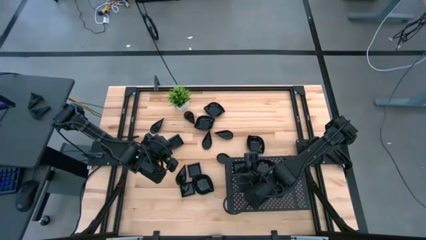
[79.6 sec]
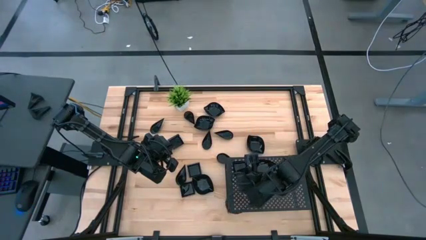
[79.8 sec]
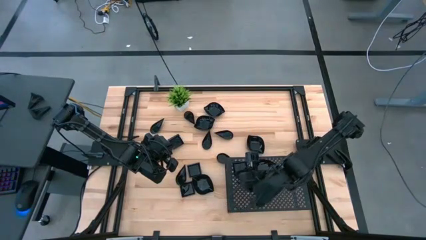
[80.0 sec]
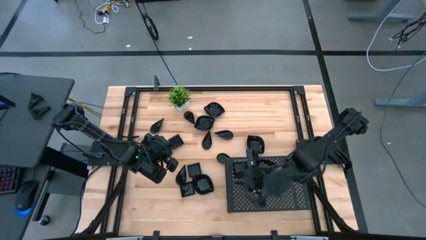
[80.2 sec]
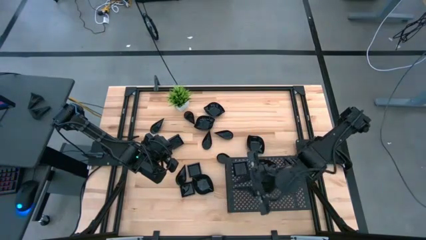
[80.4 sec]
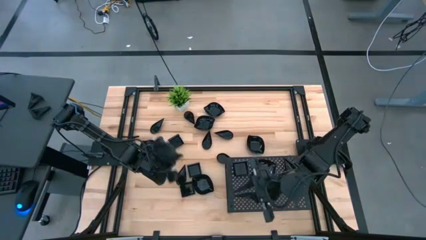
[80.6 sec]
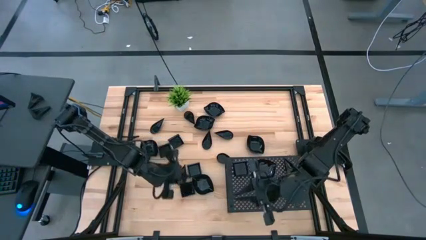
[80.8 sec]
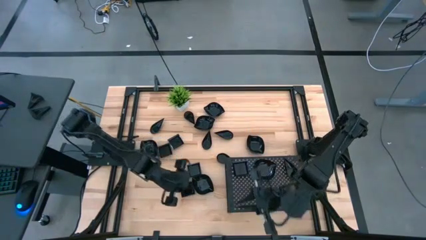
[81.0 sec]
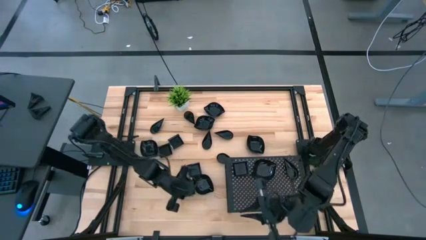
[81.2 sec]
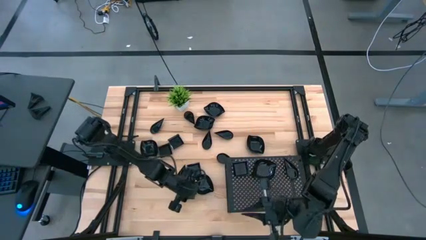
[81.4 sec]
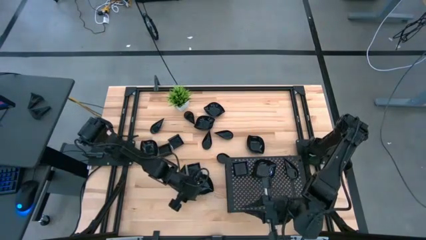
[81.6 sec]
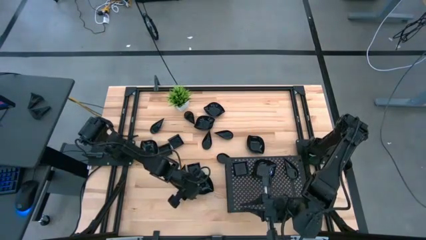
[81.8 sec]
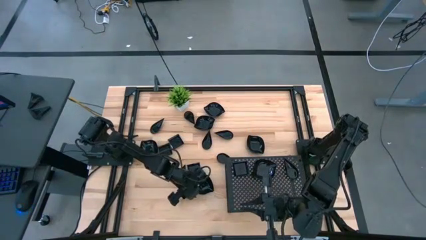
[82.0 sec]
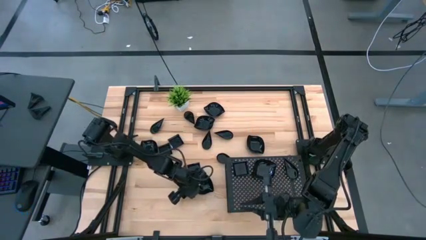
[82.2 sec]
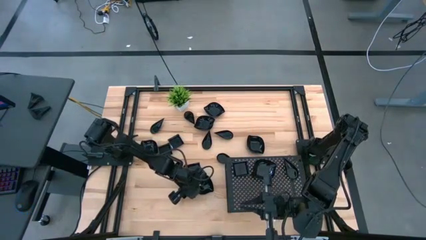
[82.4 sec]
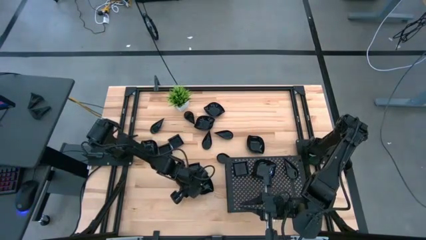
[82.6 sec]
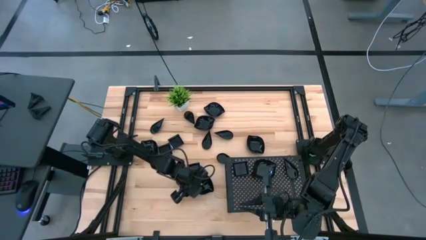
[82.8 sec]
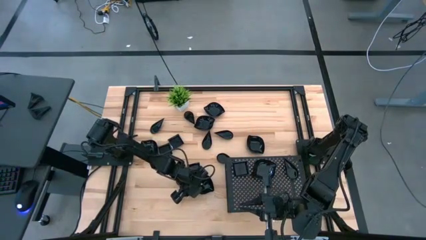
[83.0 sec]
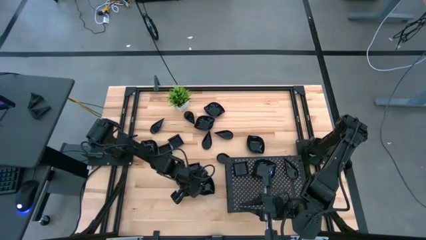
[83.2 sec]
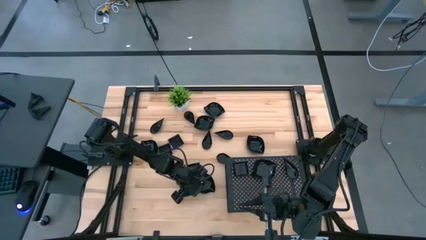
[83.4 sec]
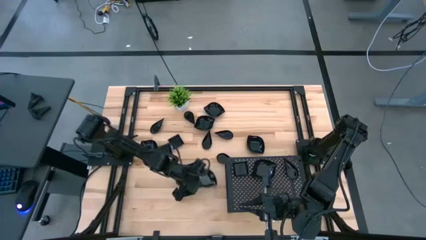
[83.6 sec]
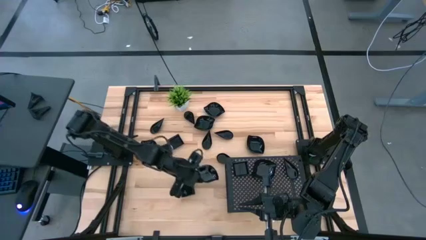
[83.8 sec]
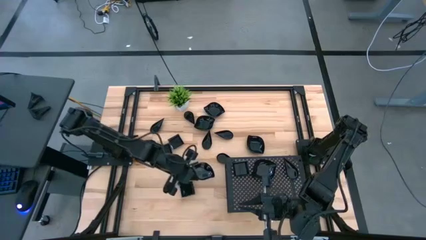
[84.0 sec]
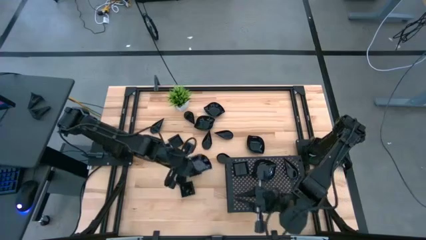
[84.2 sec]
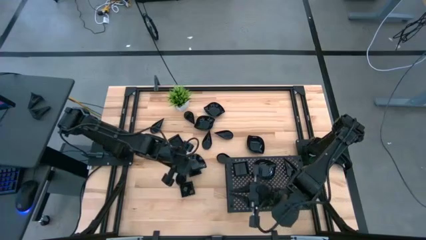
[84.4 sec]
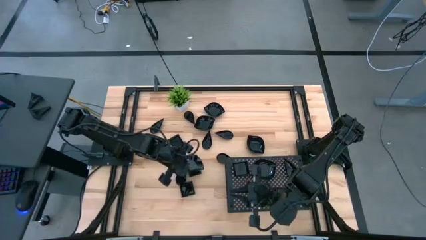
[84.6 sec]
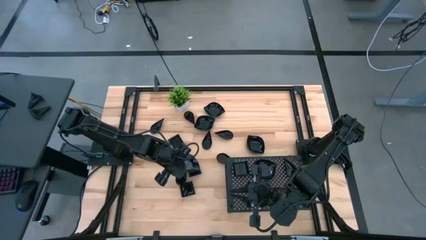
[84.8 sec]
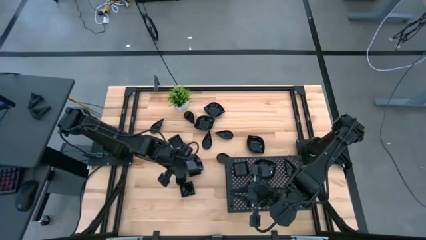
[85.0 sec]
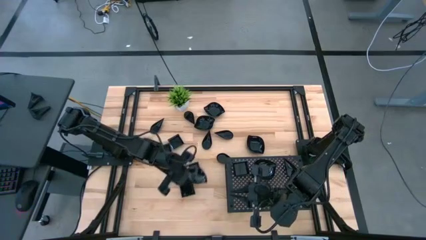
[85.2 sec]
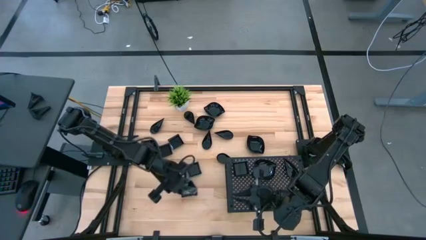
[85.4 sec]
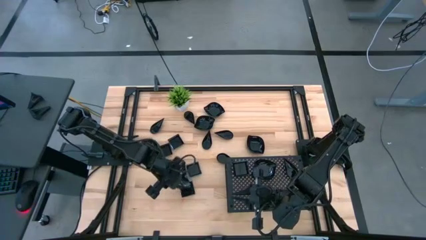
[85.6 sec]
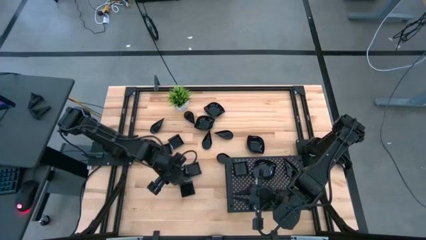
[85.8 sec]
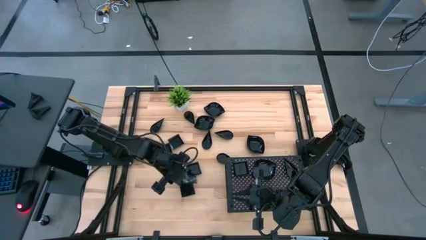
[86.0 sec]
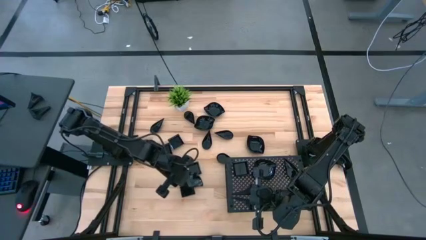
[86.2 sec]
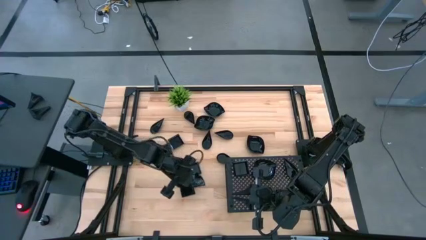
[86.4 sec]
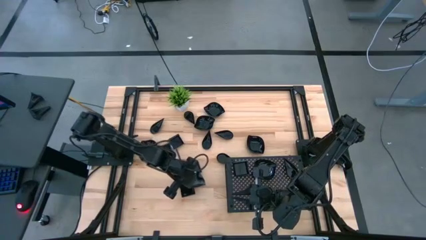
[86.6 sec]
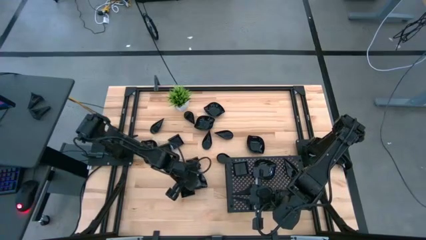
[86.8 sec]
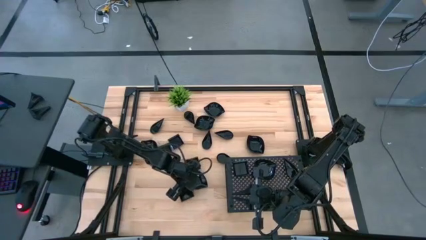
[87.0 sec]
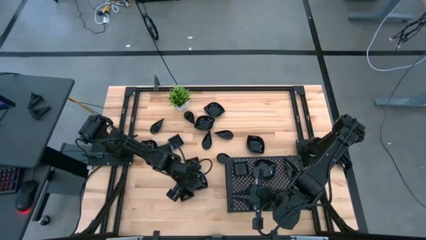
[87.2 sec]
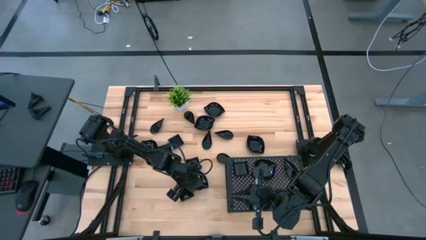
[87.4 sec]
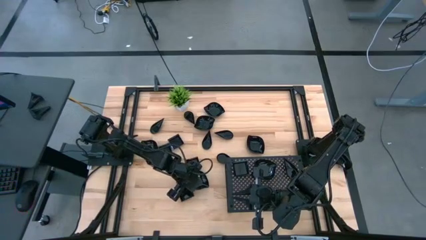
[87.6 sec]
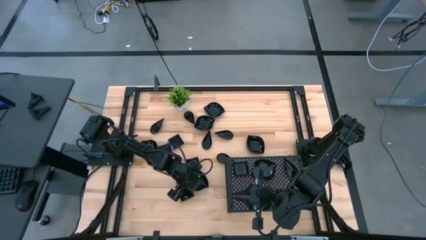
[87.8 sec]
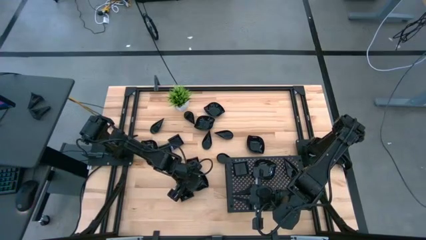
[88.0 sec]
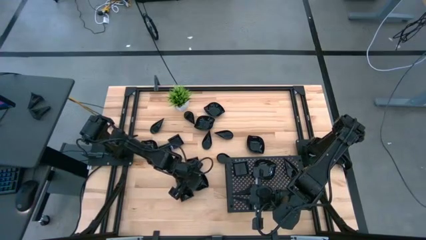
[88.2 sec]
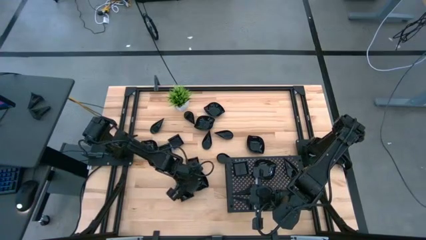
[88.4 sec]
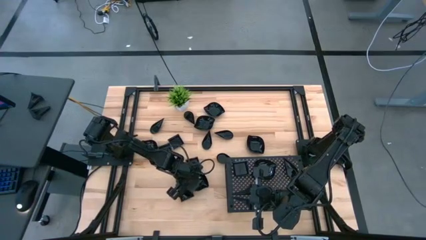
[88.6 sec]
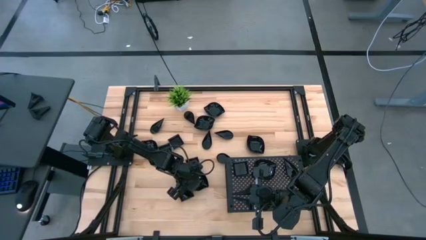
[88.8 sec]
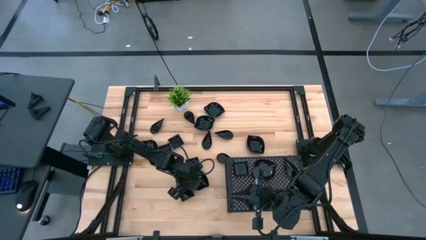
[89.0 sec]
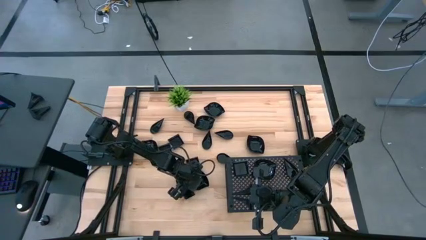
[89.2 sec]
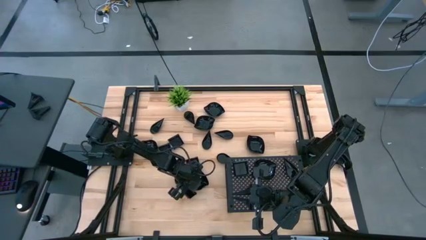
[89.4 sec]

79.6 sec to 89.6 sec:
Task: Pick & Place Mini shaped plates
Stack the leaf shaped plate on top of the leaf shaped plate on the shelf

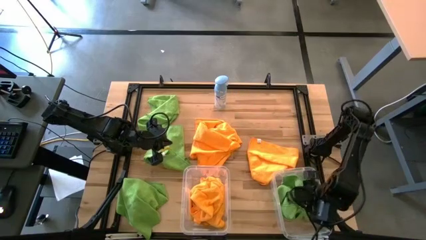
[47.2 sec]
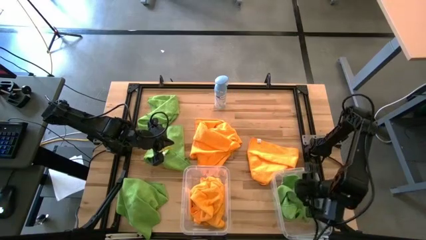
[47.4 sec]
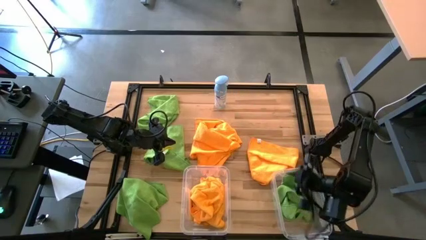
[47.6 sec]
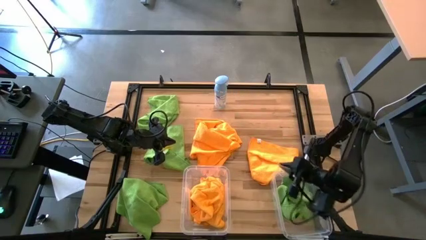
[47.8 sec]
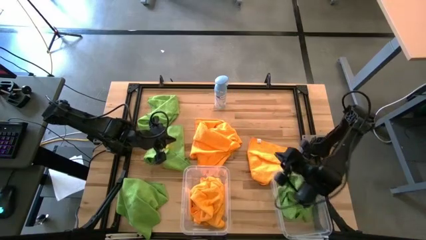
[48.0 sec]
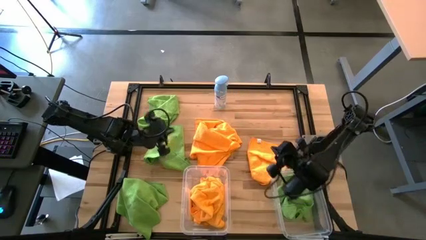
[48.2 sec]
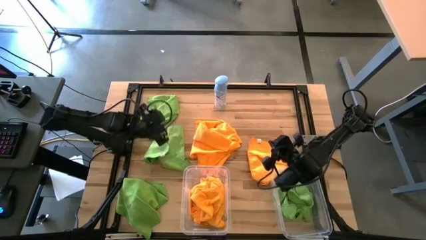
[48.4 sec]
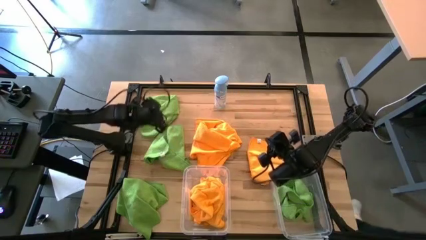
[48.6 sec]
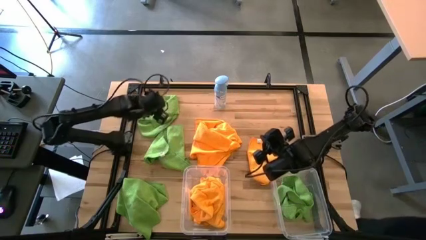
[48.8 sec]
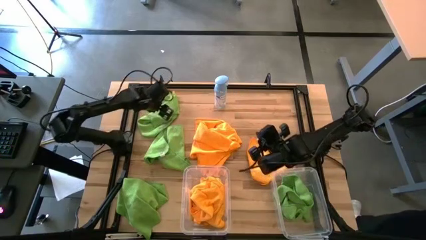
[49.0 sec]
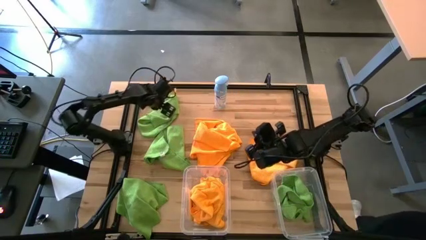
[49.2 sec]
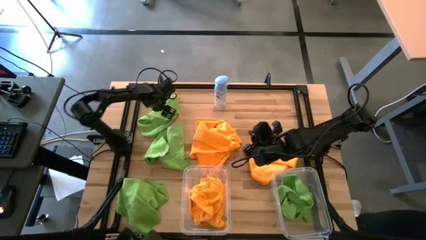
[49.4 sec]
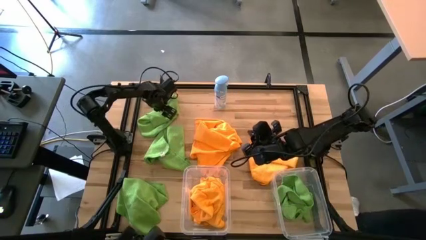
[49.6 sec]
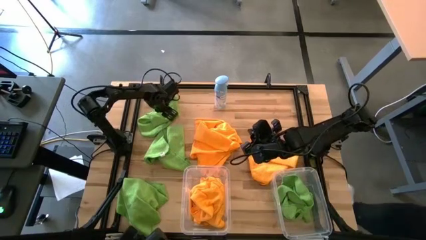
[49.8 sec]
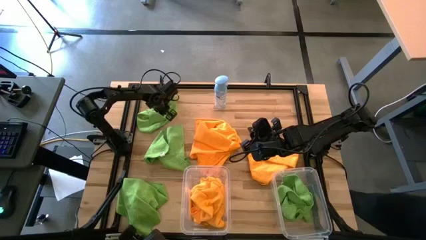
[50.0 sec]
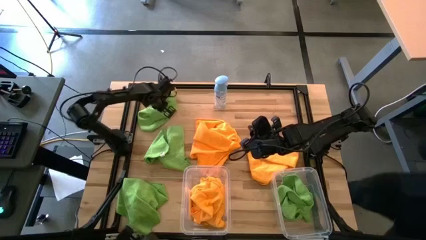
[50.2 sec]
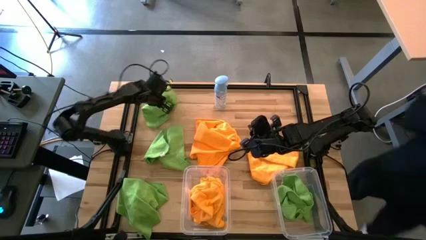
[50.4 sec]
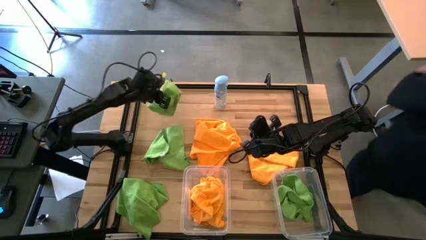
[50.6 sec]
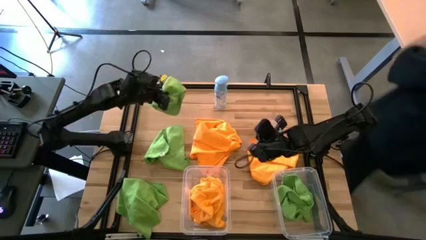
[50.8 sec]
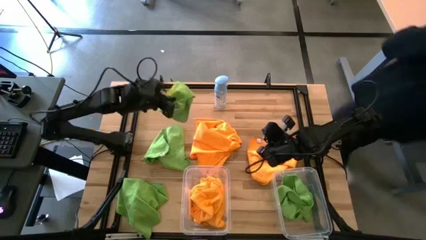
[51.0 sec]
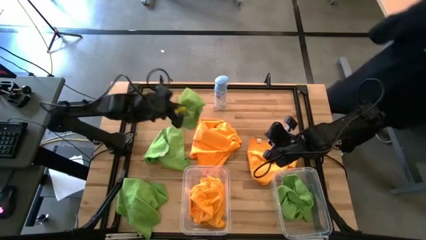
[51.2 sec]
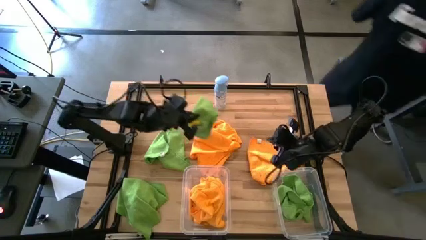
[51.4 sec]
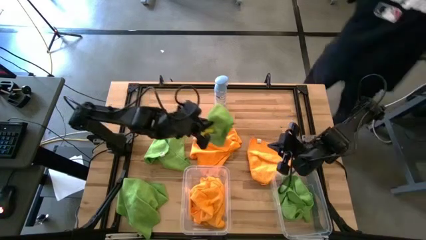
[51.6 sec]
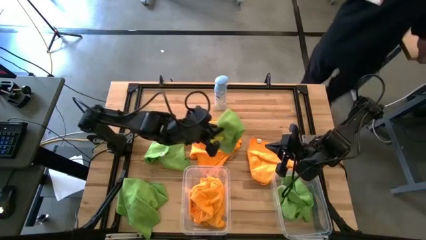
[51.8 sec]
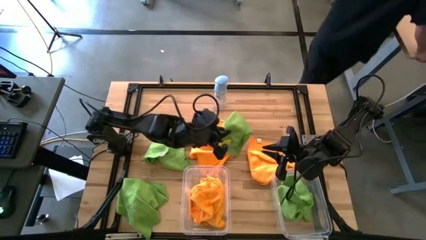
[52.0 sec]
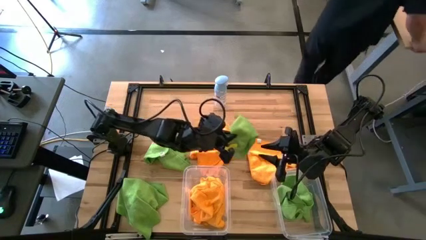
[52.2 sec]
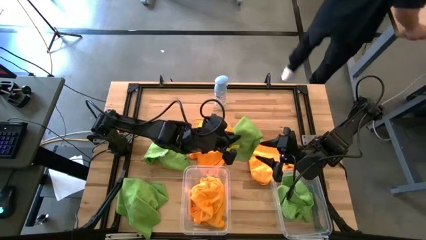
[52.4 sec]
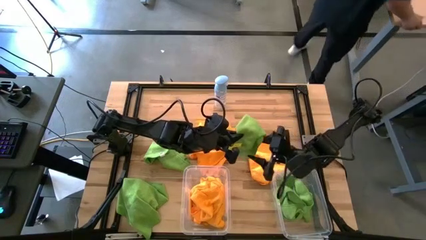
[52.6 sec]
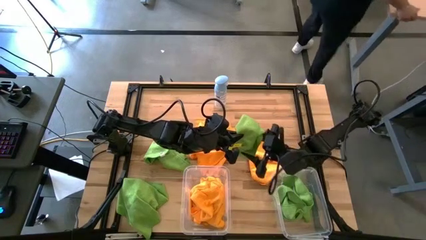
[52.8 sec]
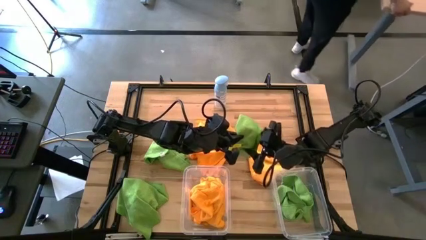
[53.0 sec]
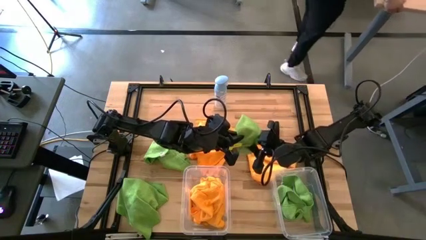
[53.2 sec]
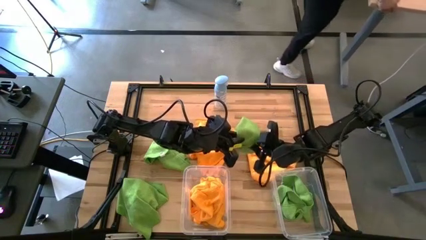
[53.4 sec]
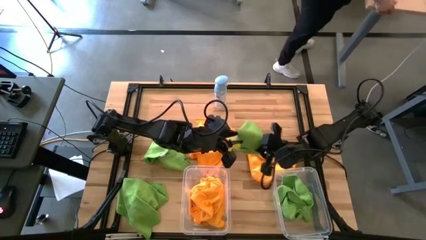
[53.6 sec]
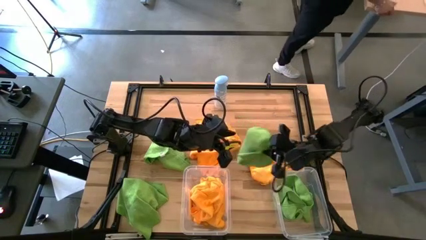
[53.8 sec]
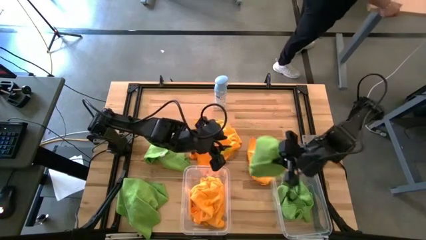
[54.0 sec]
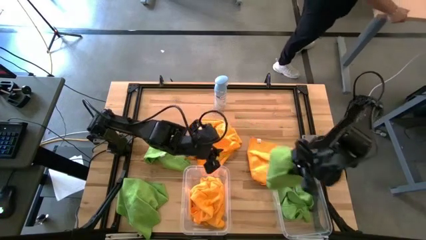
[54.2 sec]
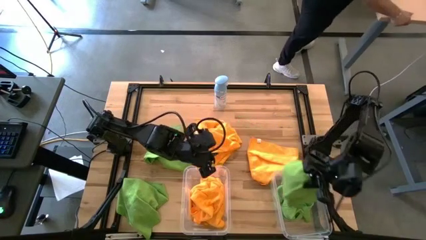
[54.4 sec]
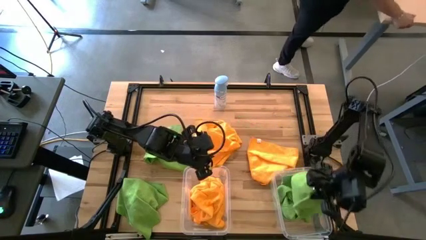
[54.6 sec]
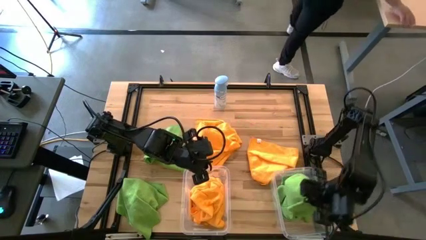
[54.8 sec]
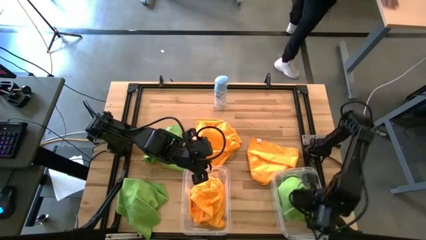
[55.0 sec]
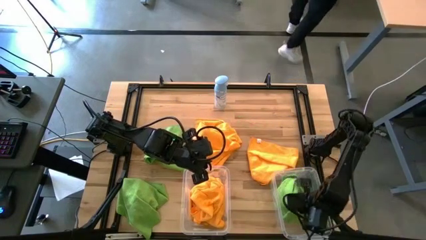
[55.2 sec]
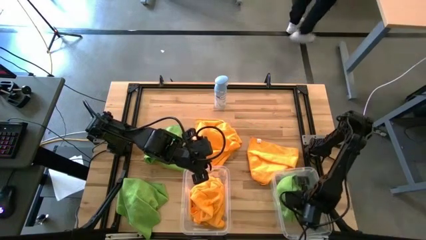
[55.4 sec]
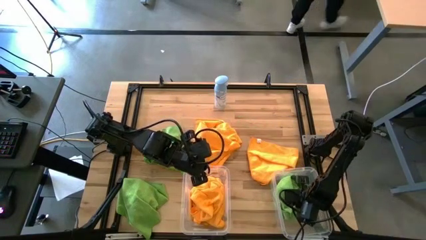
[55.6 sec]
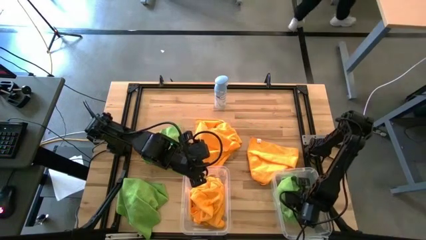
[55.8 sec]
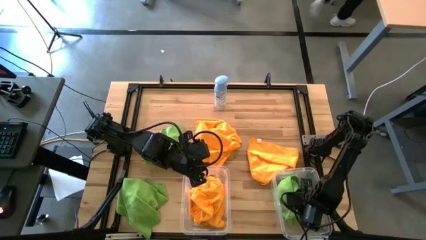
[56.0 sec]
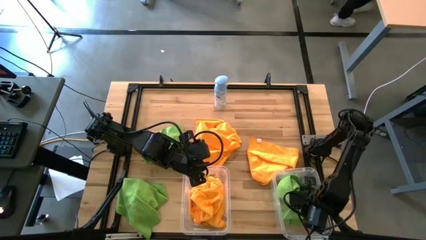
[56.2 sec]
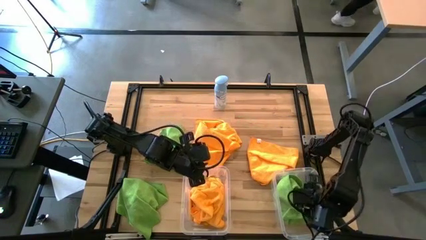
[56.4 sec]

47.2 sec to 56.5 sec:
Task: Sort microfiber towel by color & place in baskets
Put the green towel into the right transparent bin
